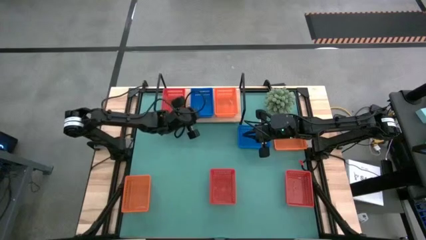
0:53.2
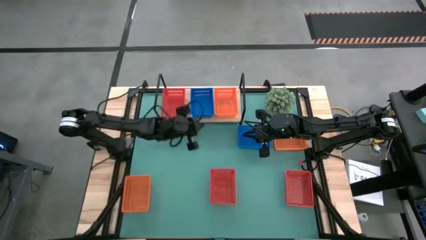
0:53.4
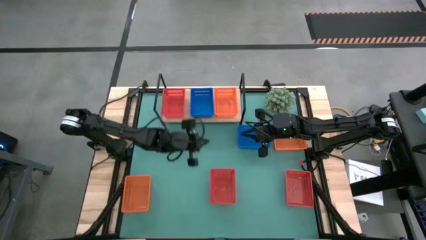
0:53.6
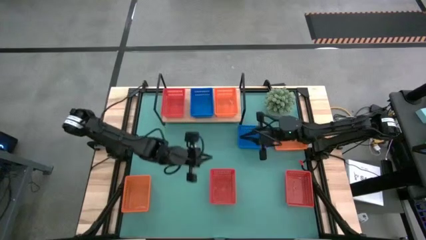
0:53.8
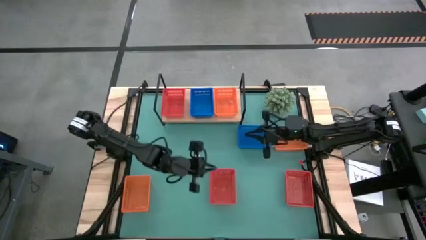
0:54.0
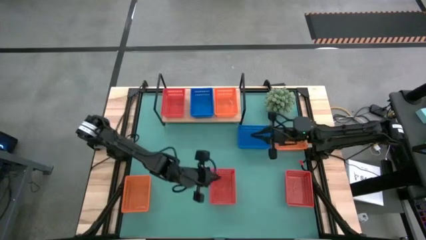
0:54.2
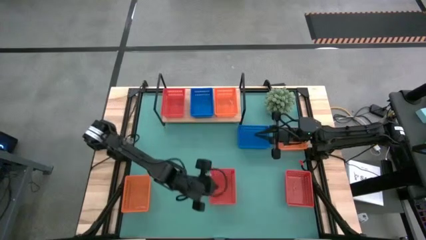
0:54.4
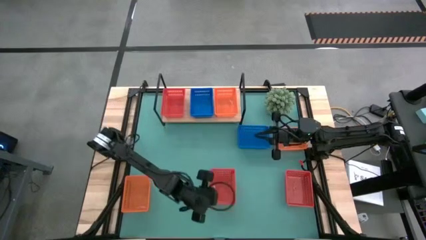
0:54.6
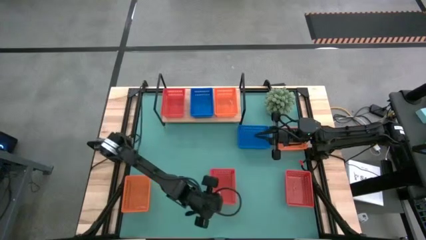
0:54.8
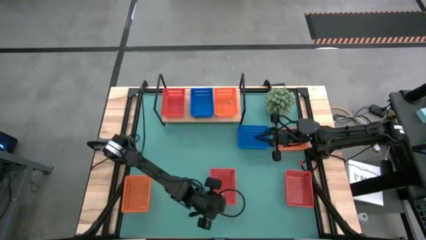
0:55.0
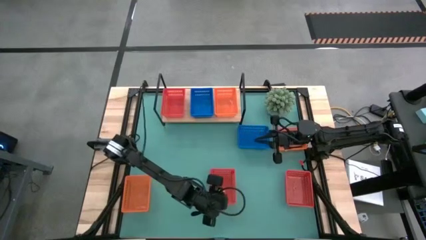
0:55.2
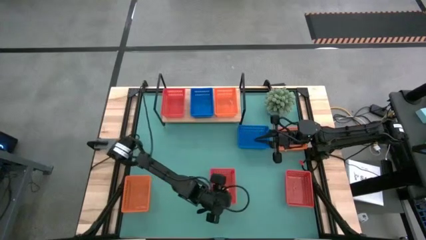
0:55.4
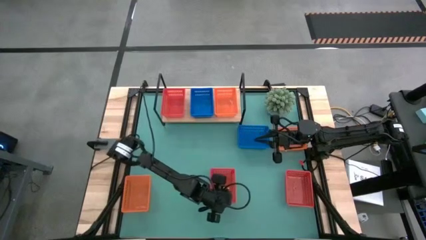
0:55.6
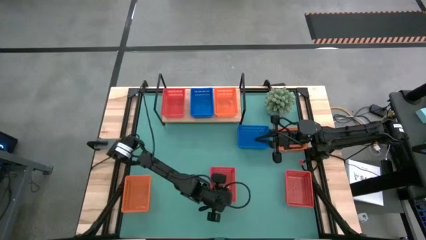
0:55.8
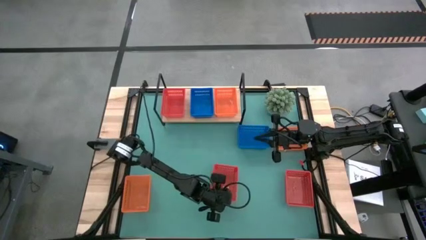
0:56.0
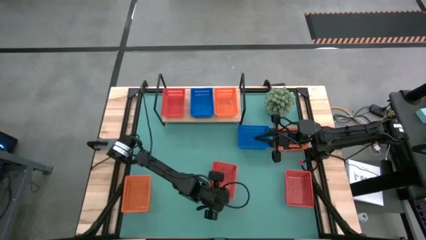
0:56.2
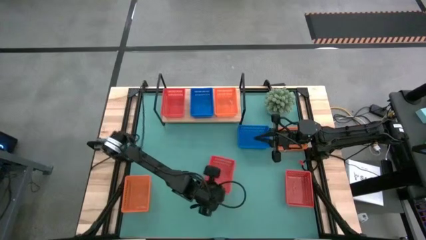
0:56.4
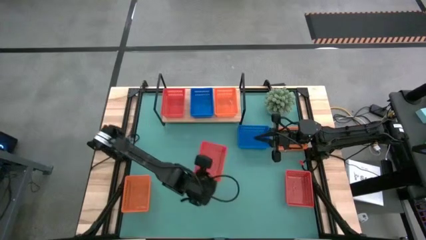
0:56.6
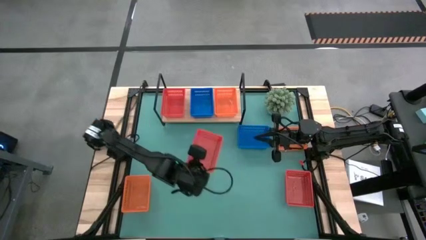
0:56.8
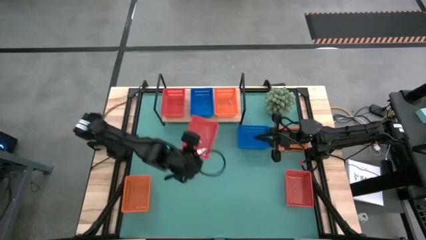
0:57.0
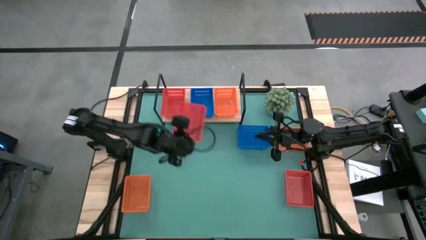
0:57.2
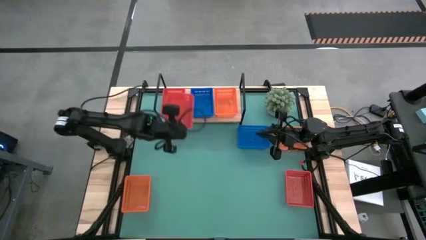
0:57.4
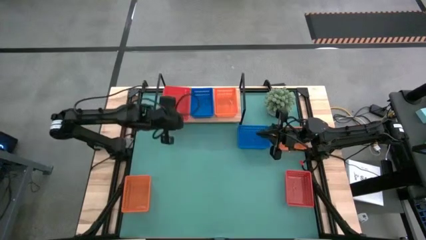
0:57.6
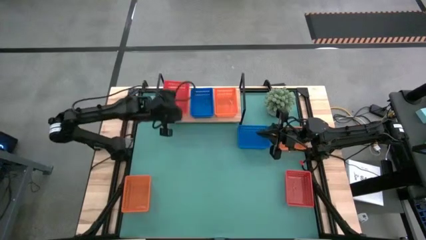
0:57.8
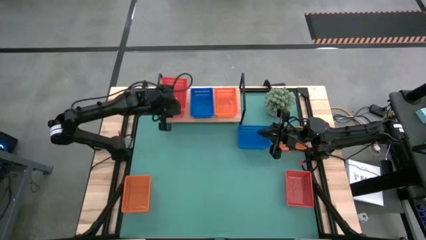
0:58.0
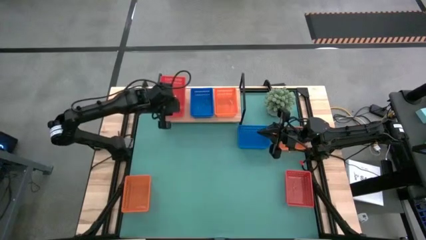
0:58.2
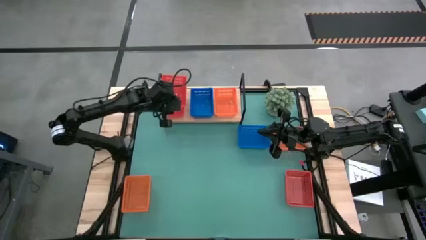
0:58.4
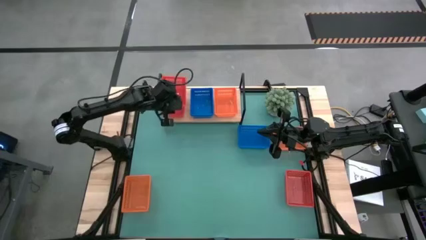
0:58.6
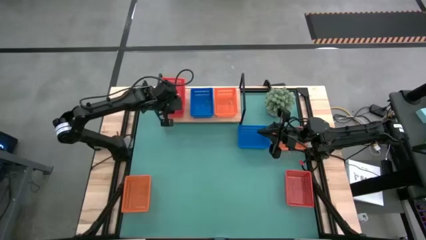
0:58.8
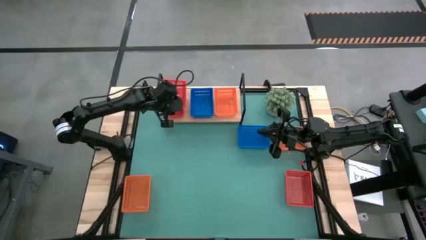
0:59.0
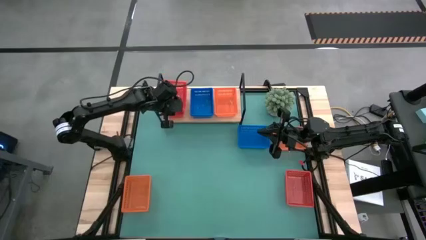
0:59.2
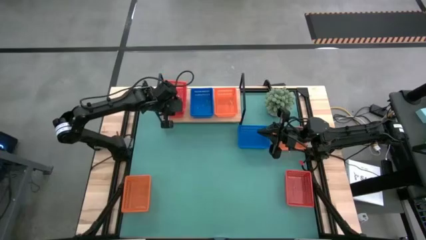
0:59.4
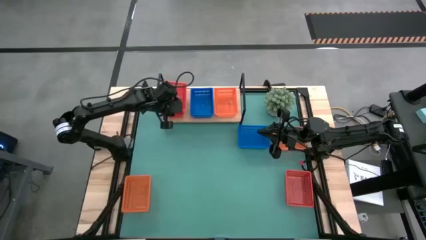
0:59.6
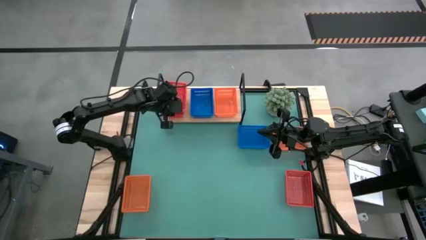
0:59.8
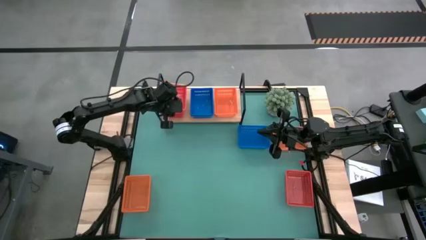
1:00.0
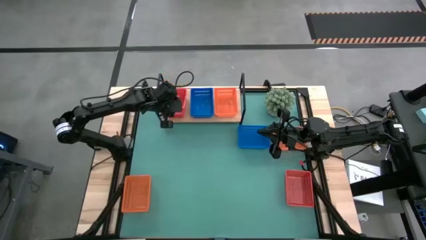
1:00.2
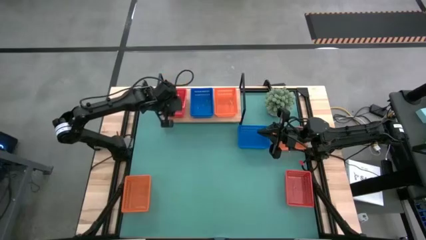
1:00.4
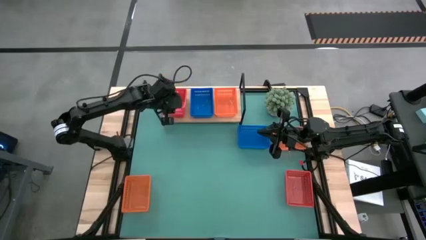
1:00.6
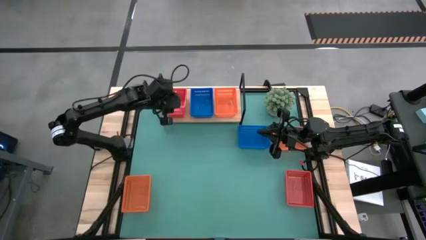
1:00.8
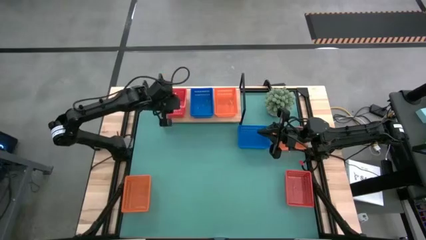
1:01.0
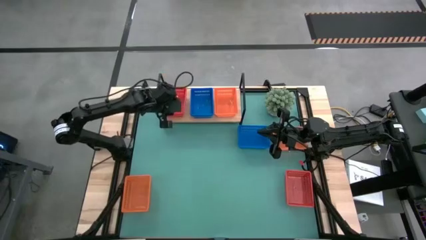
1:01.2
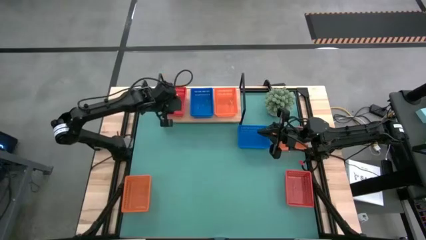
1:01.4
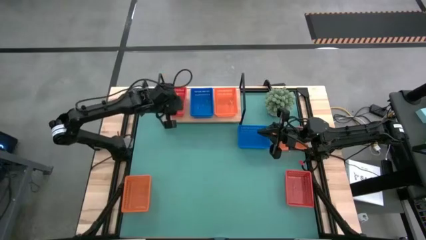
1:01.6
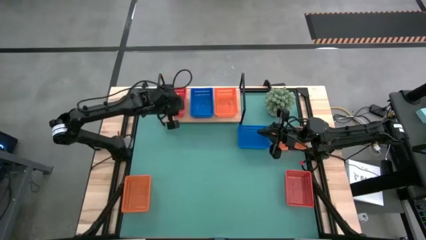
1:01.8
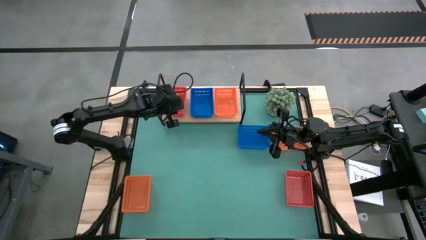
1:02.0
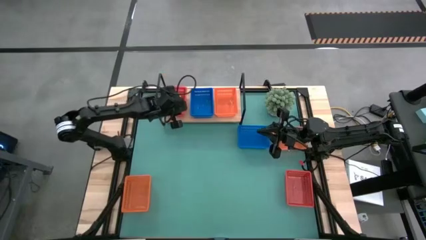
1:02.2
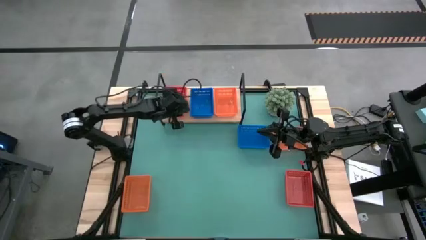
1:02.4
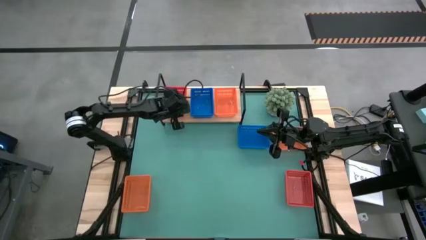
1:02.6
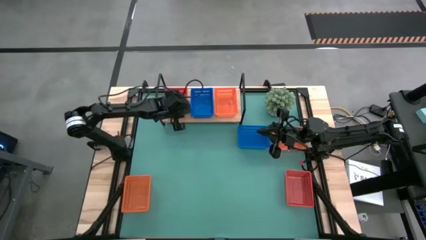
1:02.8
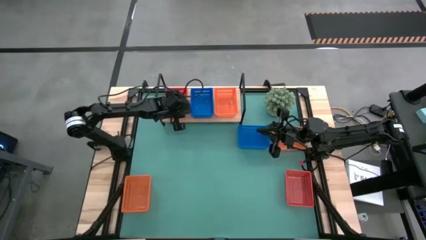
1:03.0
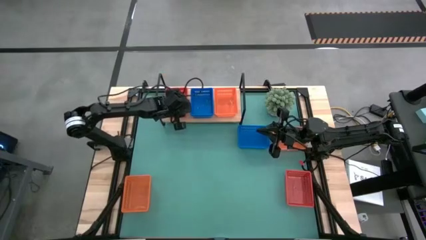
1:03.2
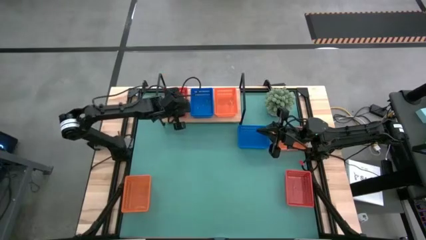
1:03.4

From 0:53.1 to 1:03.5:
Task: Stack baskets on shelf by color
Stack the left red bin on top of the red bin on the shelf

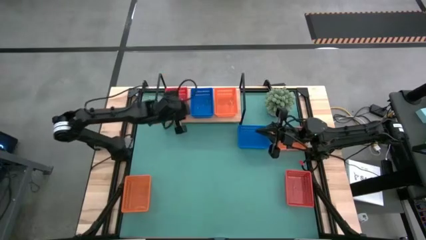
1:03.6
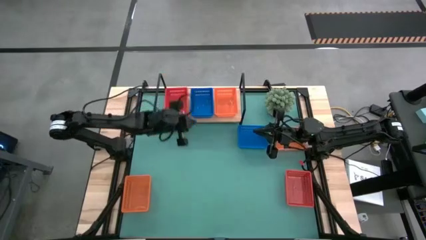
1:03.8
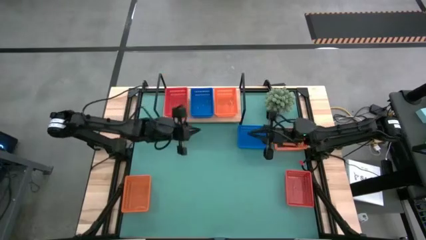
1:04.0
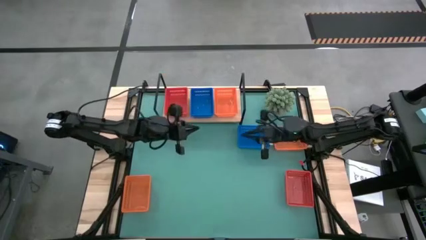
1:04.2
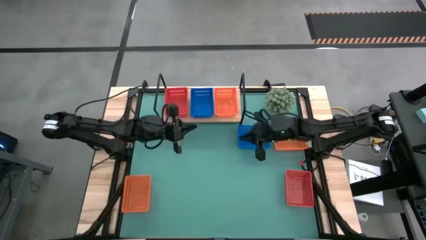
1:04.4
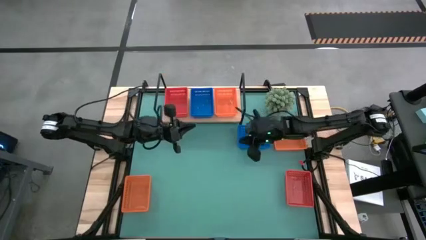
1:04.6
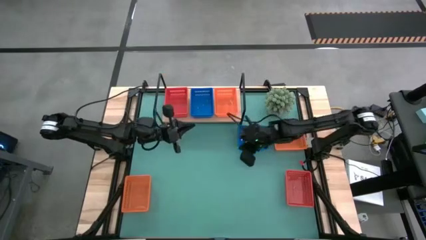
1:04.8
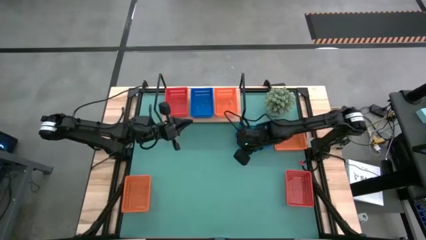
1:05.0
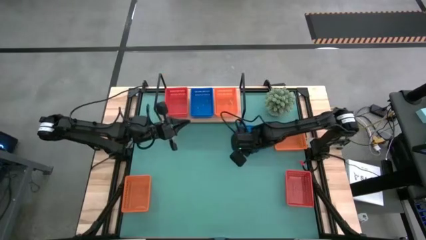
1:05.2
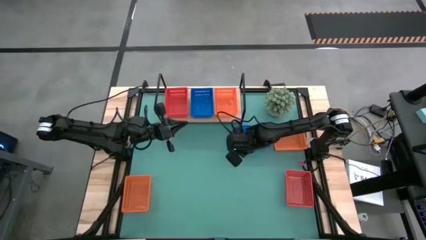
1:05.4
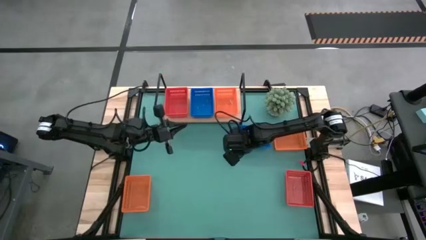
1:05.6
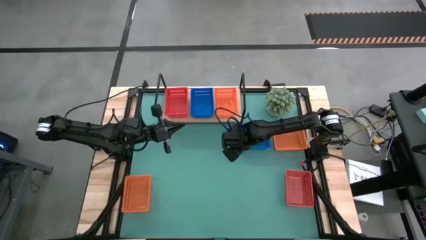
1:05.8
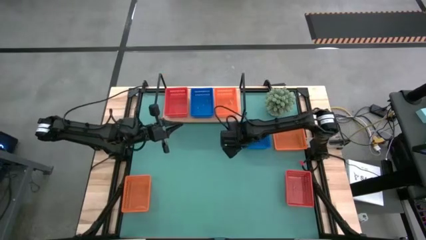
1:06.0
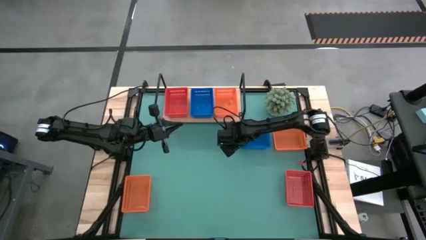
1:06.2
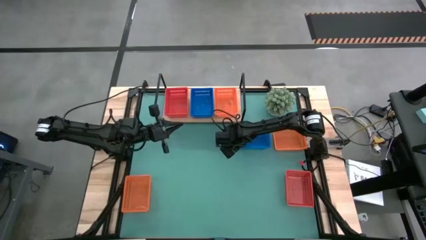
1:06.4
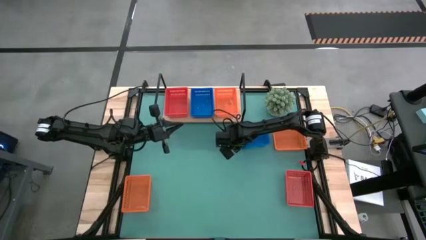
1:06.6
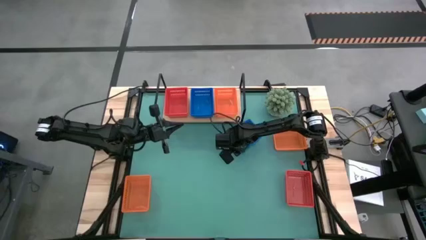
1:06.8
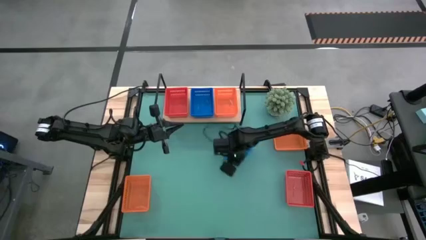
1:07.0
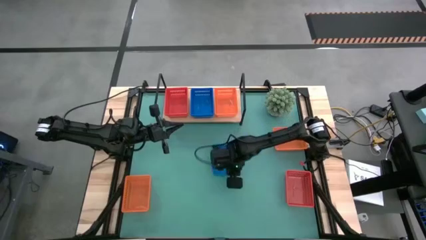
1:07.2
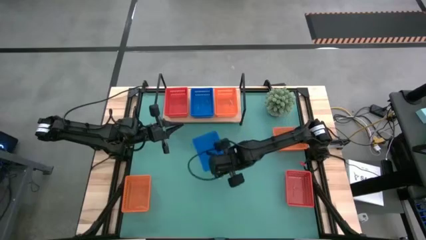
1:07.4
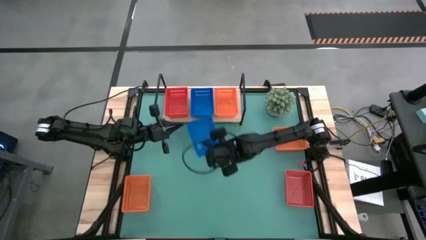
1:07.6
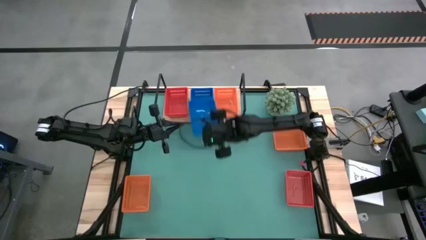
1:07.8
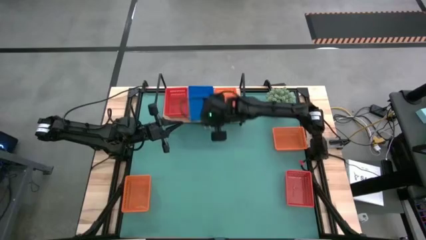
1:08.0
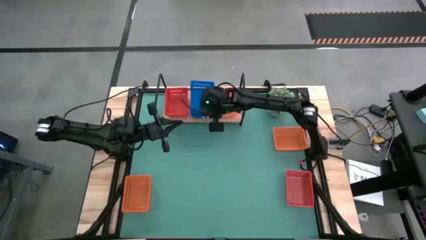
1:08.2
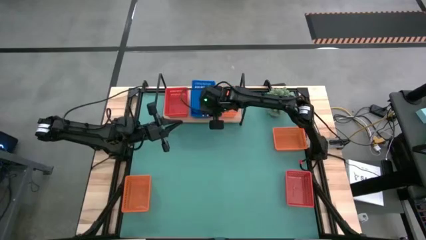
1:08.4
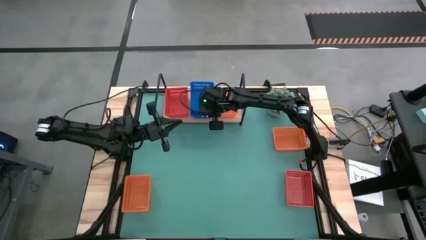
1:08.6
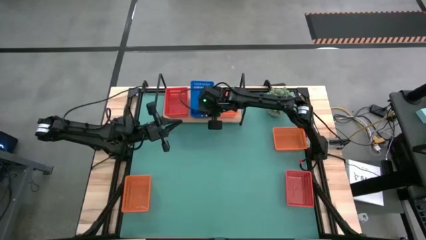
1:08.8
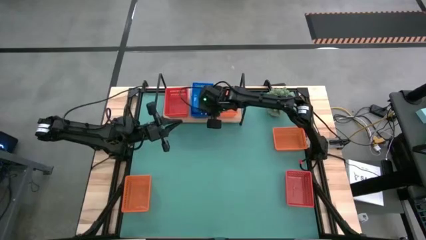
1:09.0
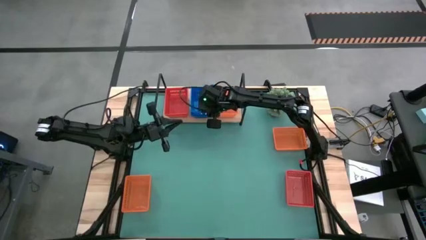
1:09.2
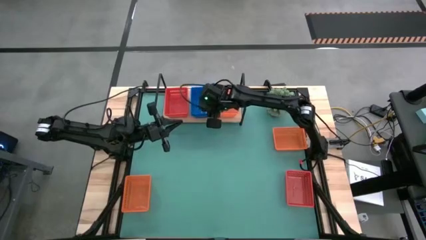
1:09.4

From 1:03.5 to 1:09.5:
Stack the blue bin on top of the blue bin on the shelf
